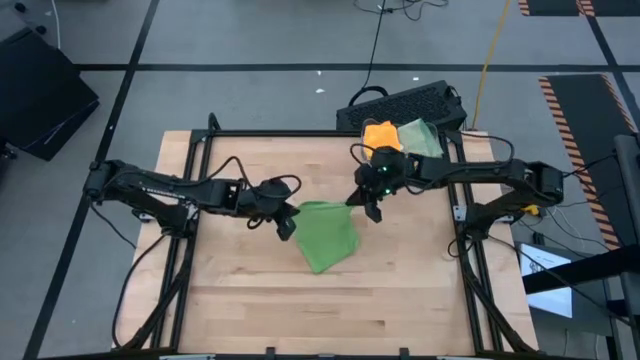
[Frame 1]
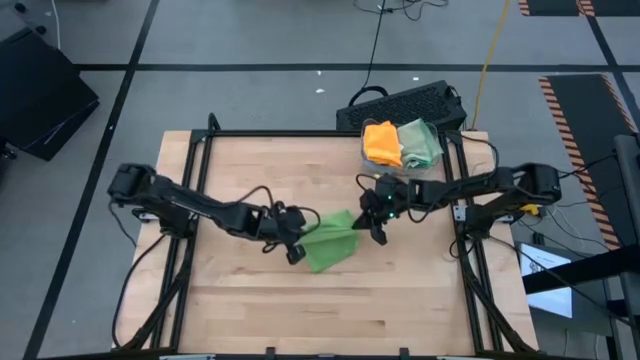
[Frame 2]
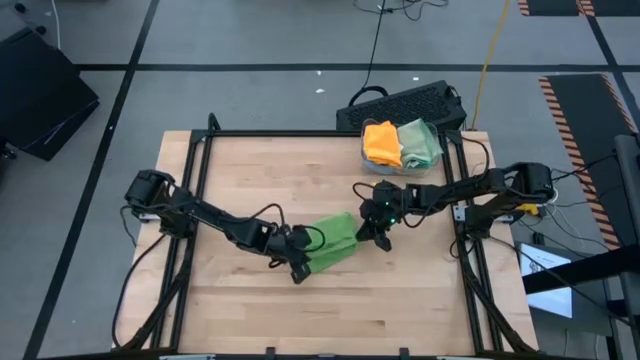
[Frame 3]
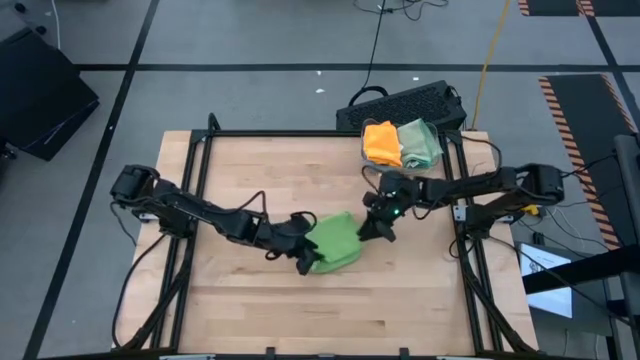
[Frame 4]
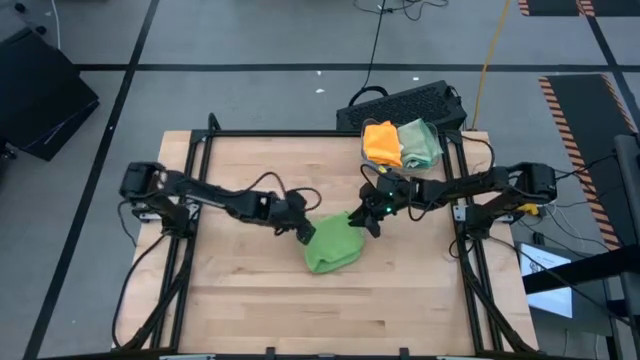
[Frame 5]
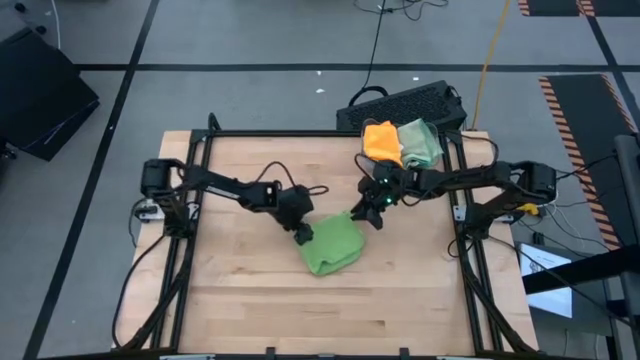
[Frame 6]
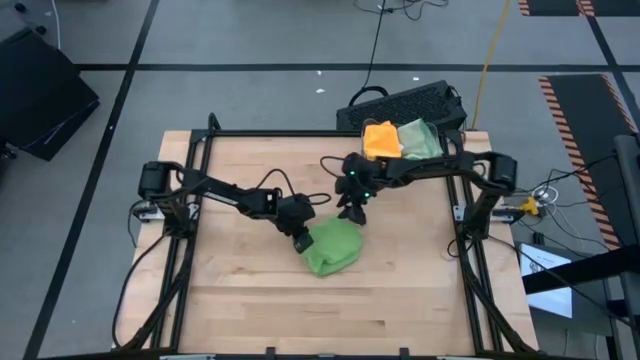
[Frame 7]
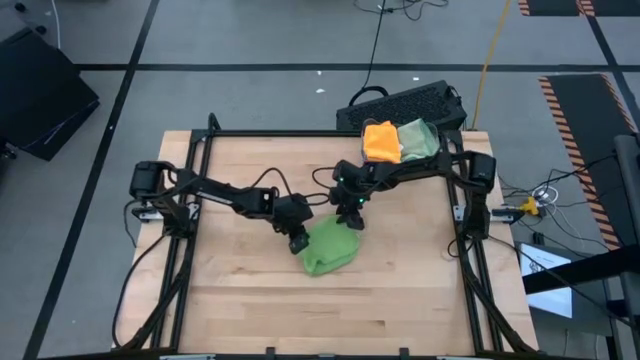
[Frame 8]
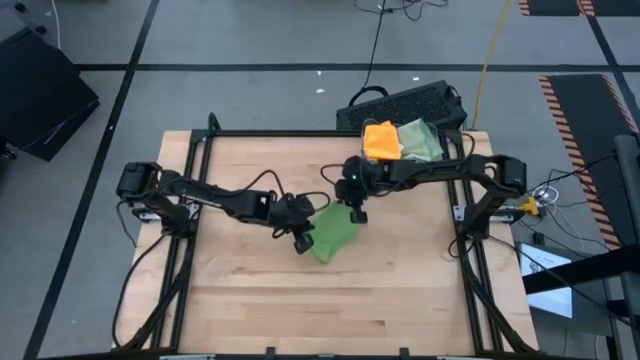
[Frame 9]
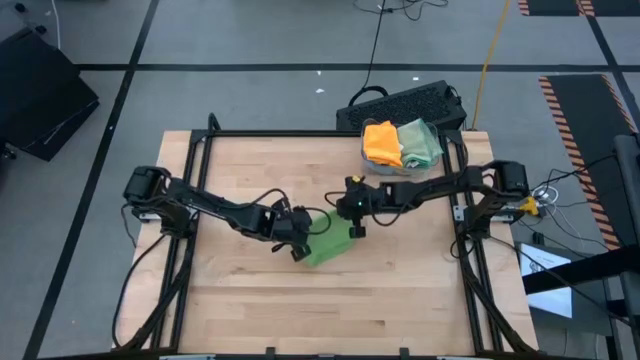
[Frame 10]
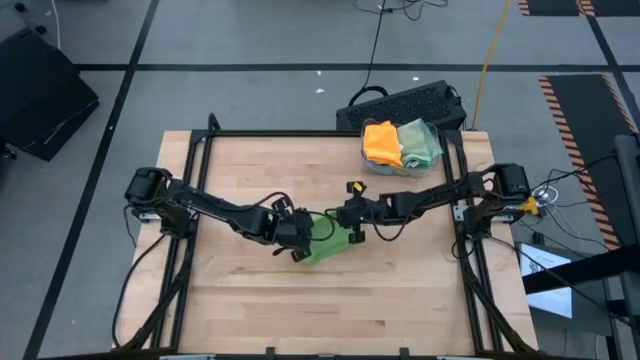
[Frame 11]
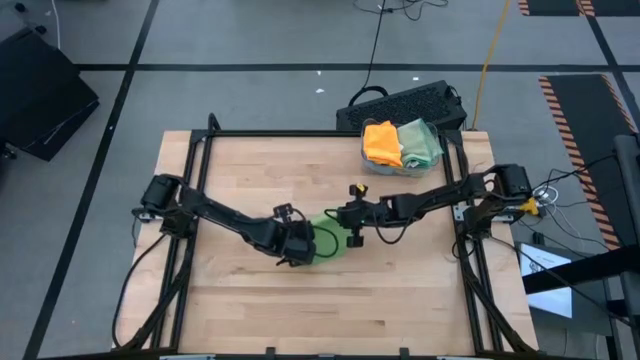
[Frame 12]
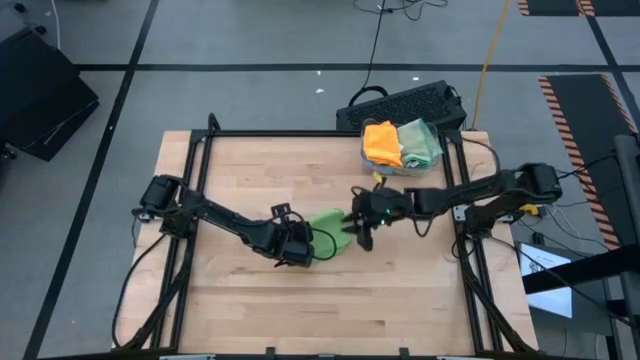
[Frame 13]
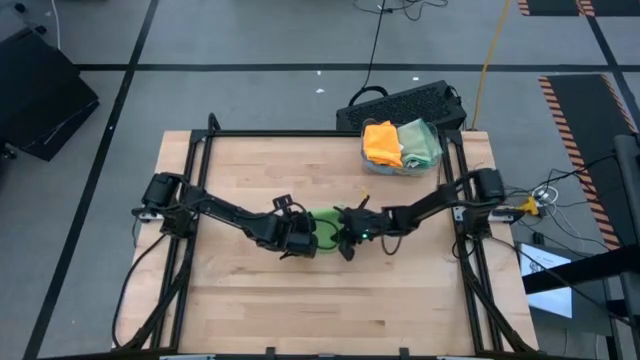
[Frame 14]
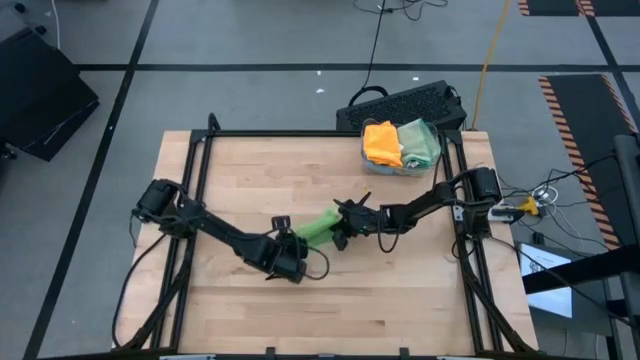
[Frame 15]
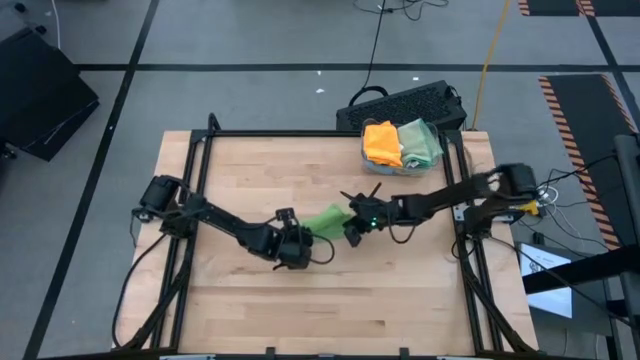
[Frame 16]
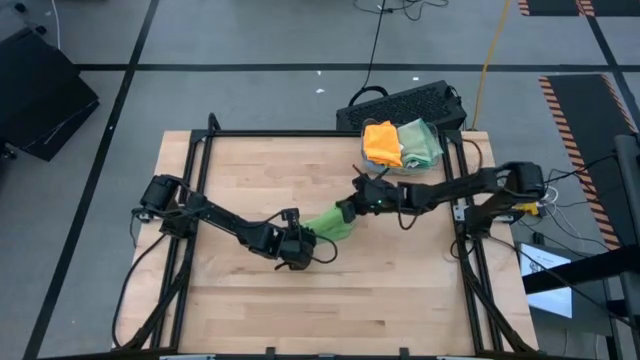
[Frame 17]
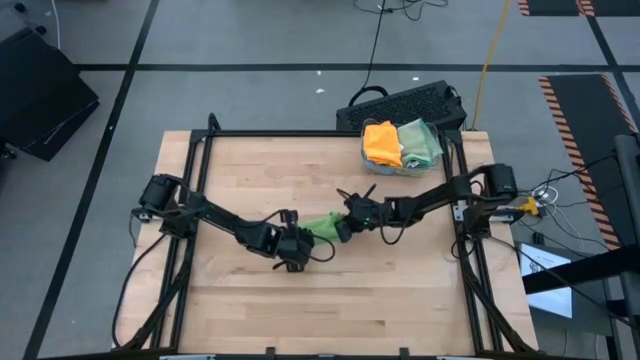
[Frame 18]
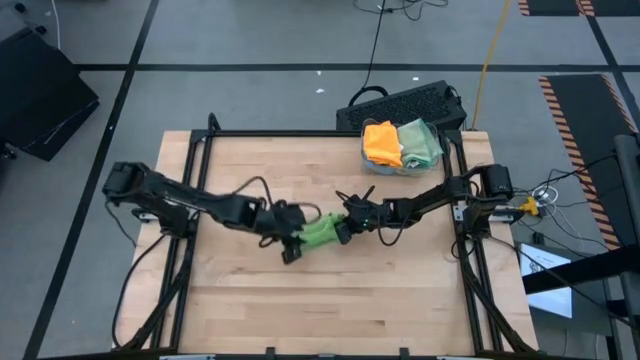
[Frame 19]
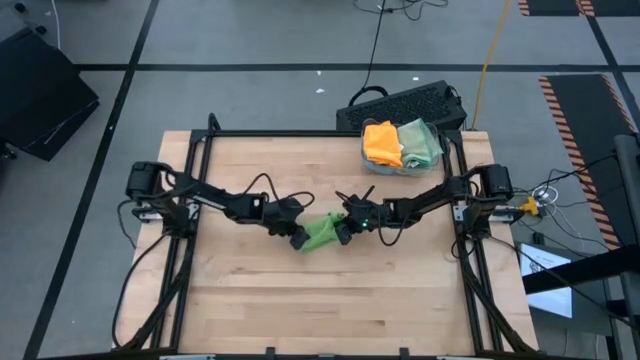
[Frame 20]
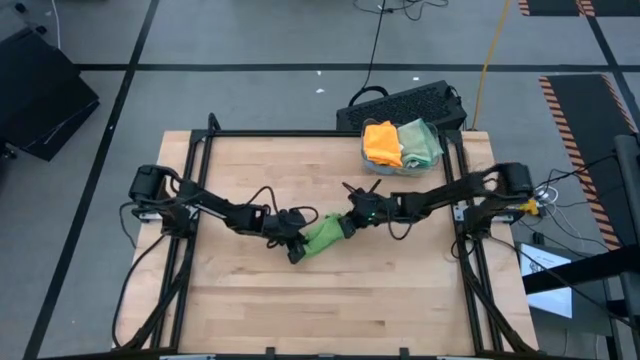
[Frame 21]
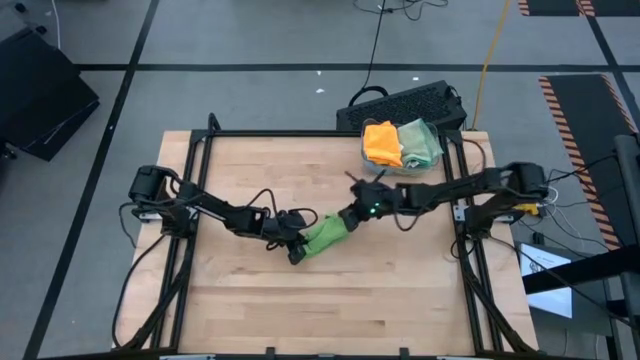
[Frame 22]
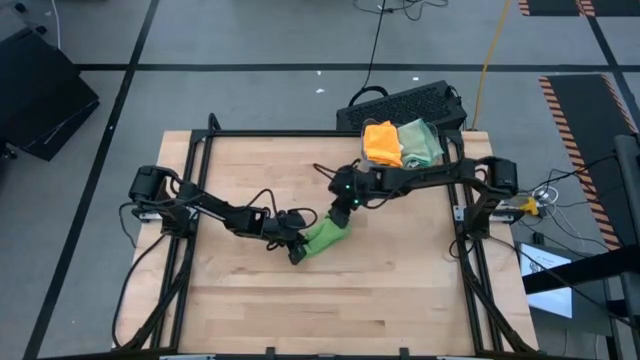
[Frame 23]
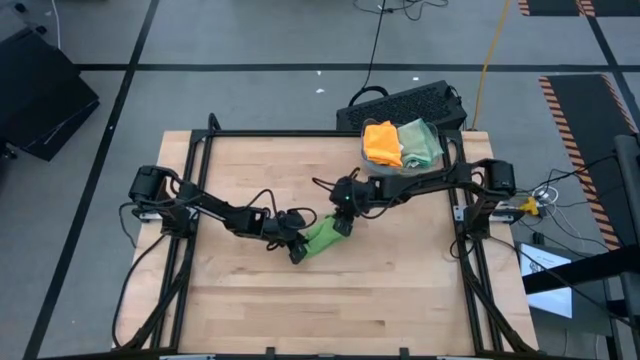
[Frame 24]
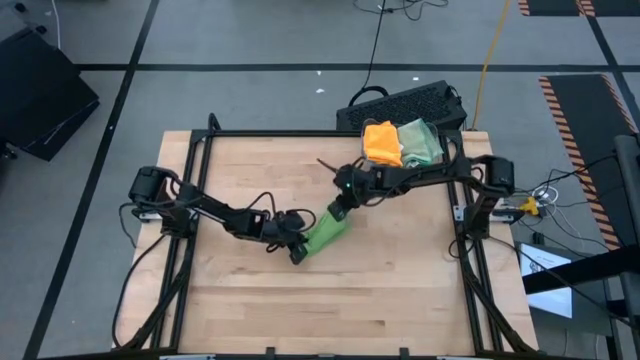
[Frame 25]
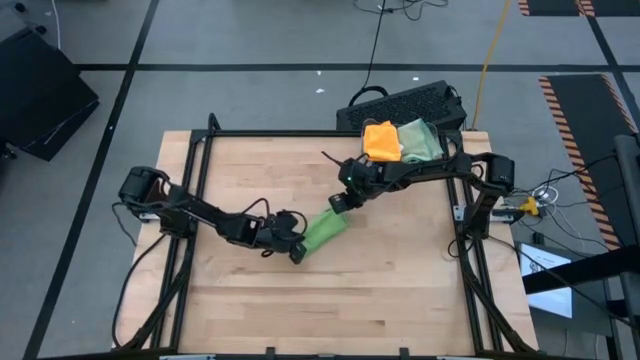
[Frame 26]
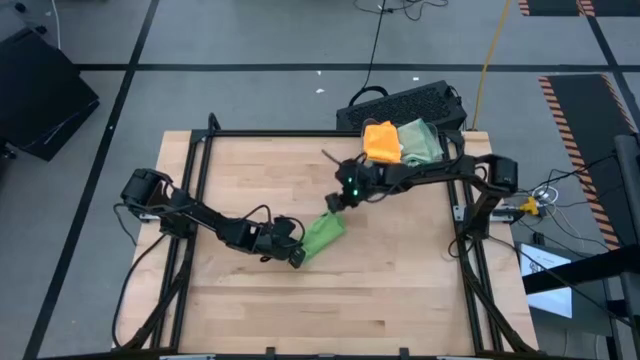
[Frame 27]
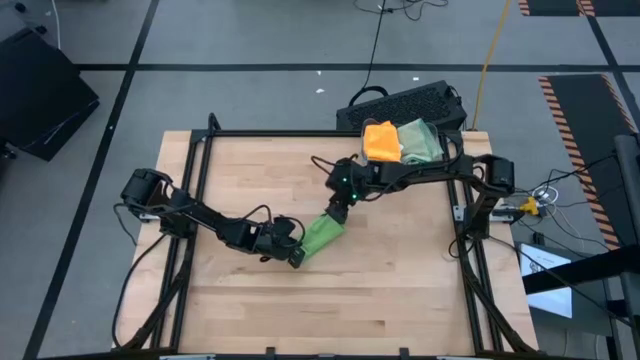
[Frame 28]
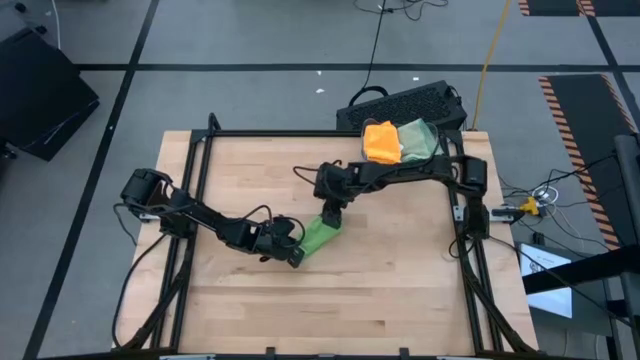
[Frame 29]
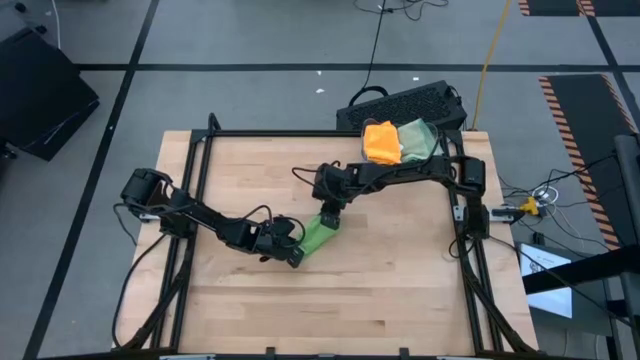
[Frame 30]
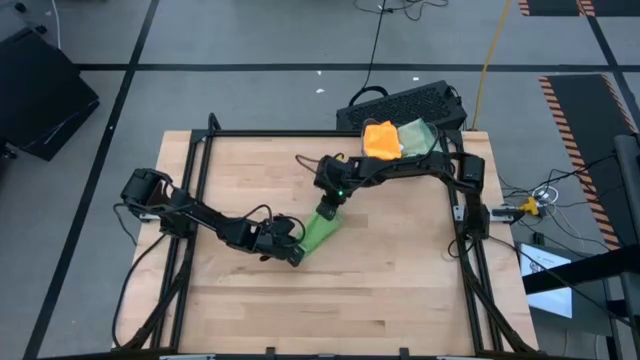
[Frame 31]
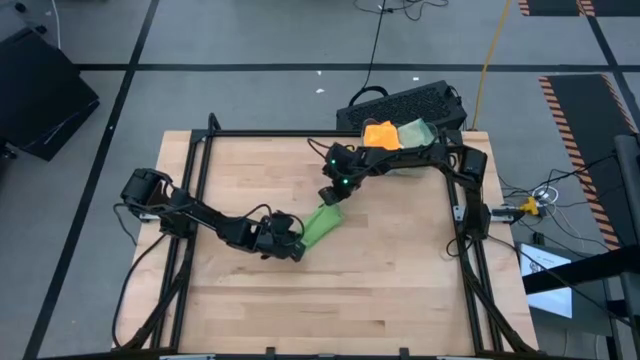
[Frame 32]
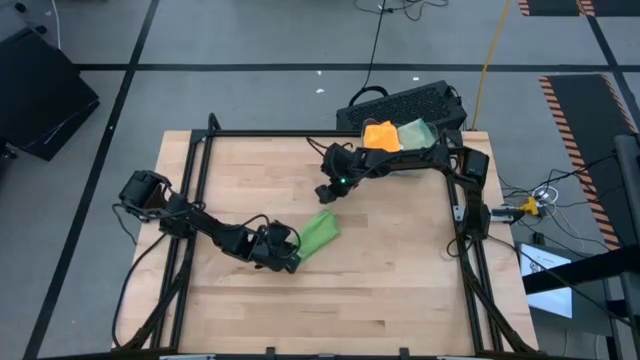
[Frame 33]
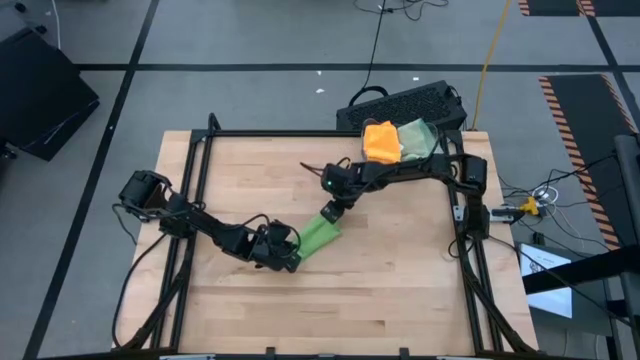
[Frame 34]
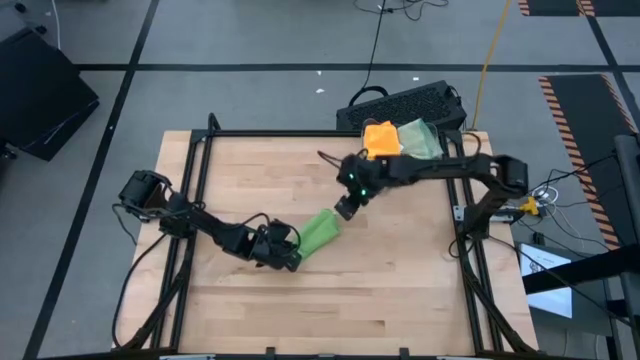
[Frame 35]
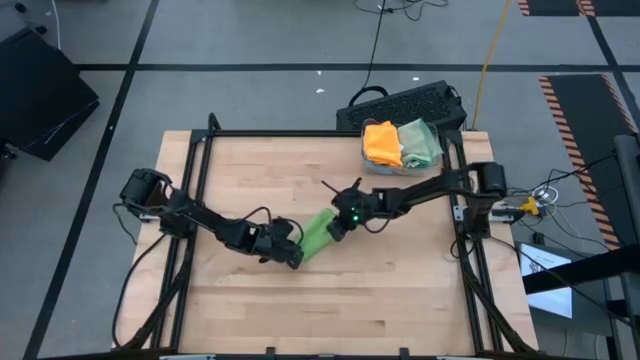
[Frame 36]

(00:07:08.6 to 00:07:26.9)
Task: Fold microfiber towels
Fold the green microfiber towel
